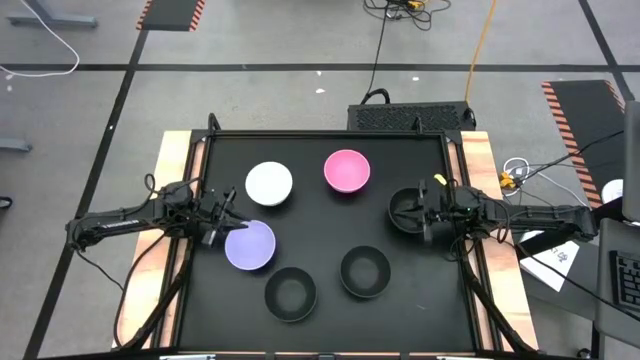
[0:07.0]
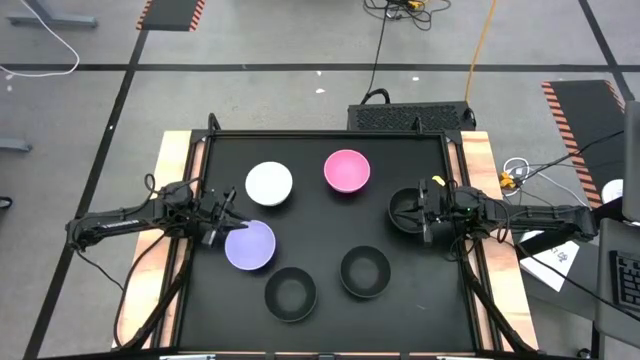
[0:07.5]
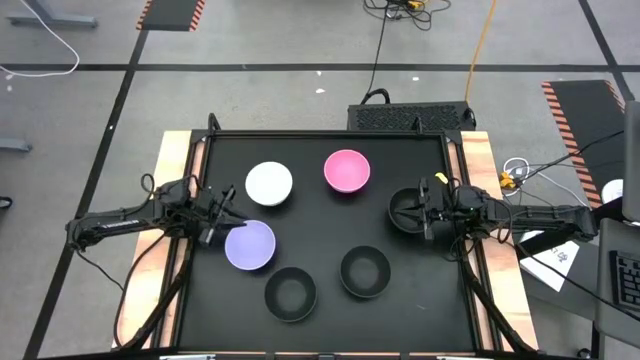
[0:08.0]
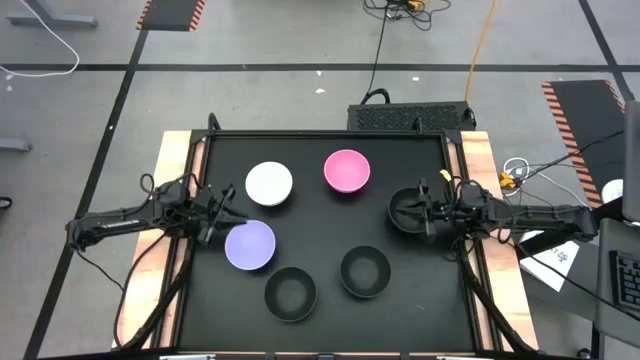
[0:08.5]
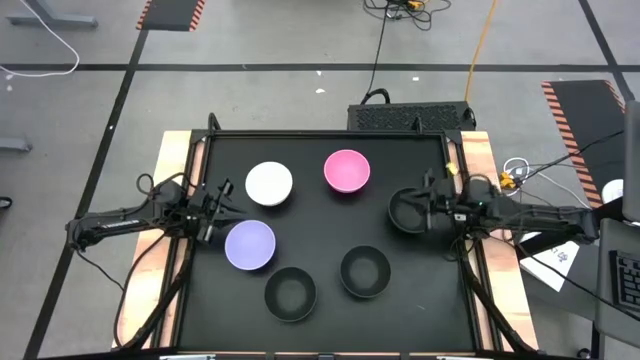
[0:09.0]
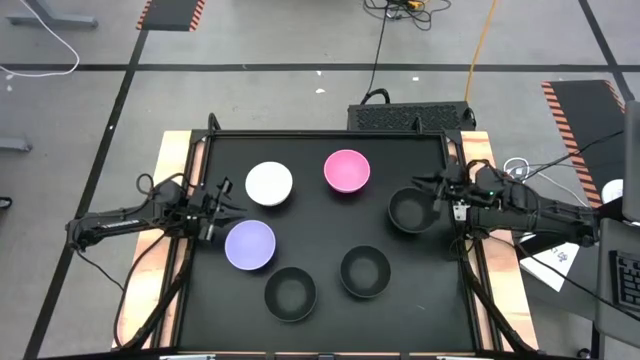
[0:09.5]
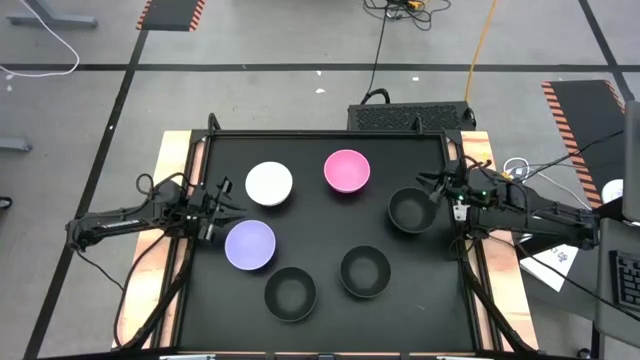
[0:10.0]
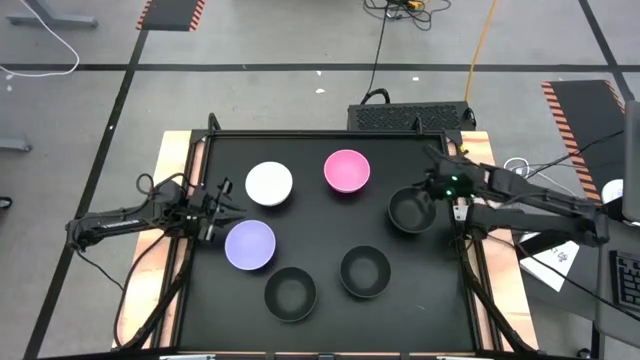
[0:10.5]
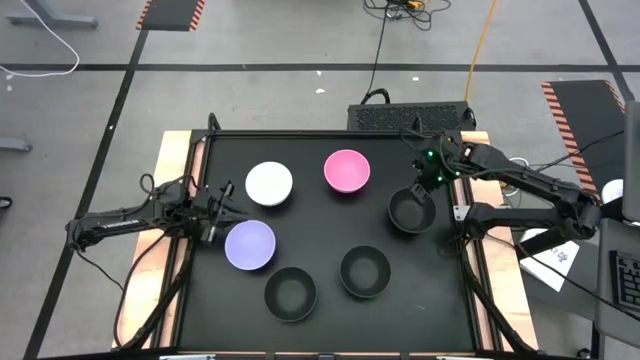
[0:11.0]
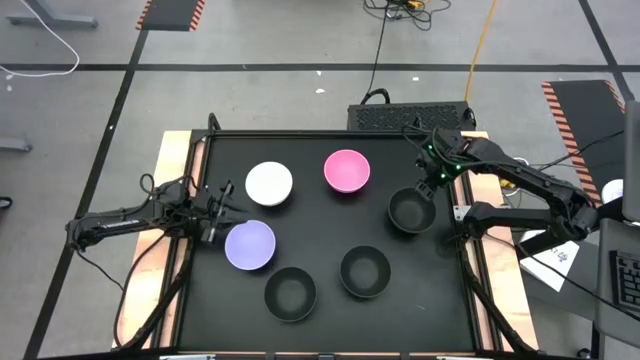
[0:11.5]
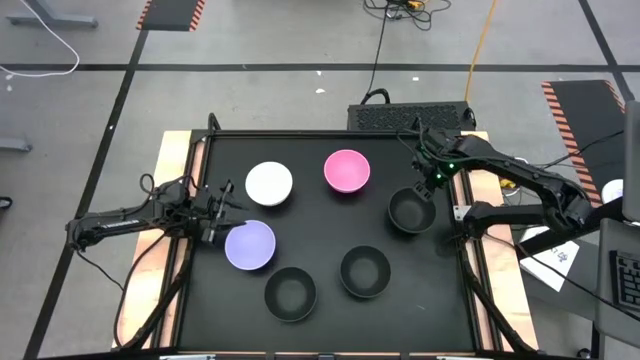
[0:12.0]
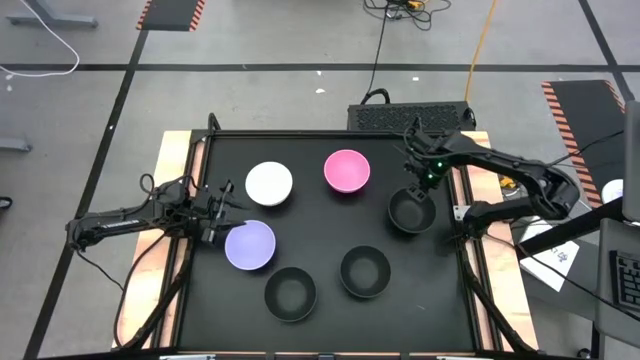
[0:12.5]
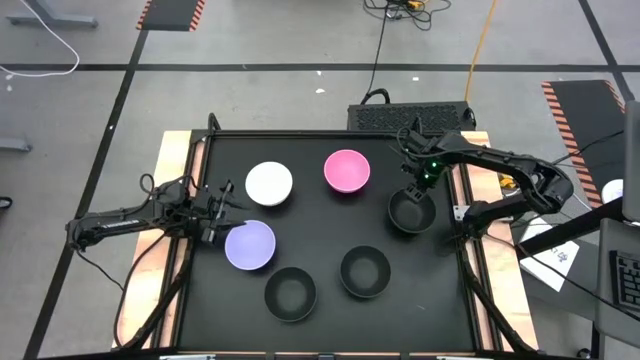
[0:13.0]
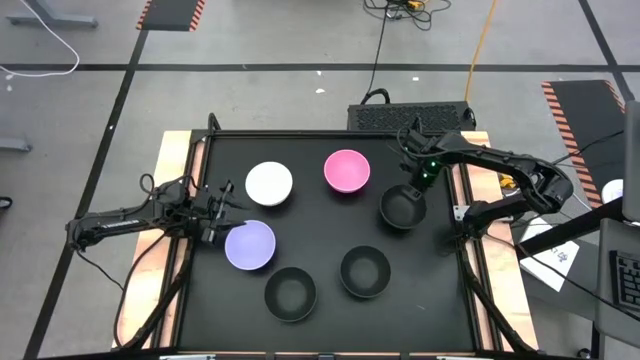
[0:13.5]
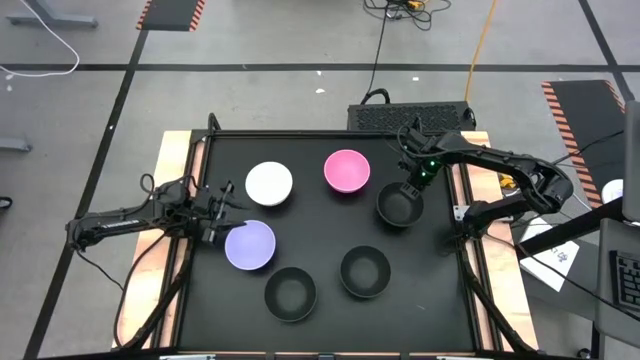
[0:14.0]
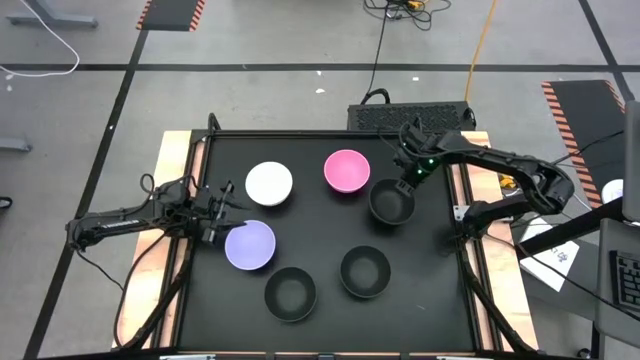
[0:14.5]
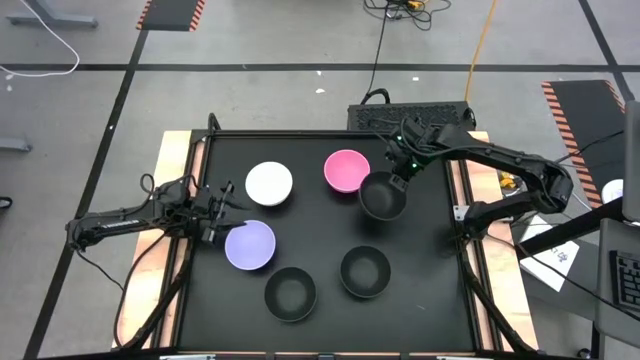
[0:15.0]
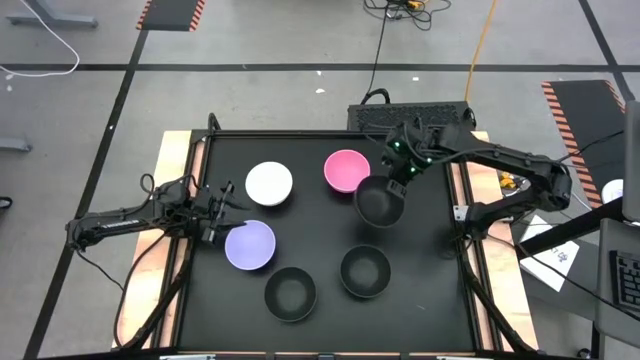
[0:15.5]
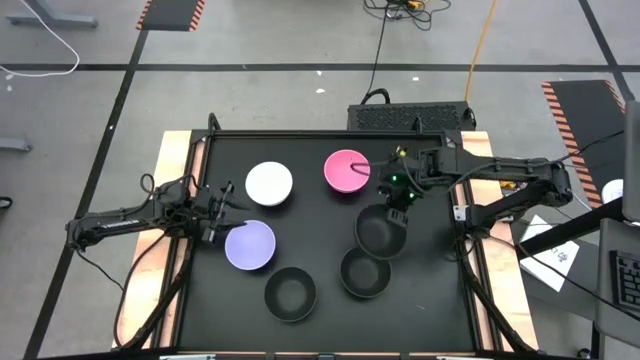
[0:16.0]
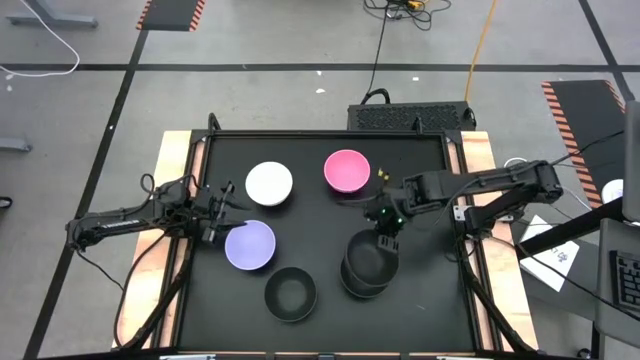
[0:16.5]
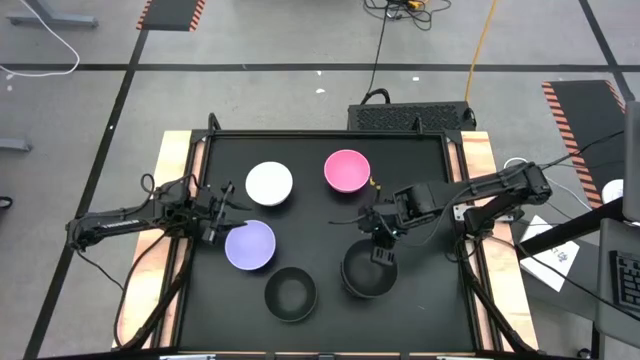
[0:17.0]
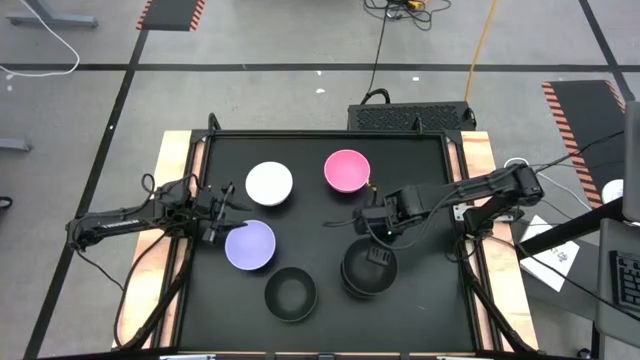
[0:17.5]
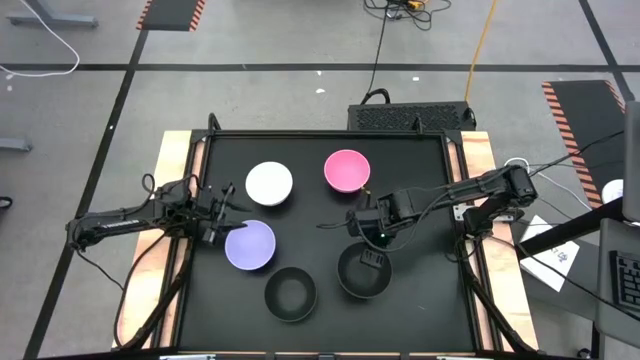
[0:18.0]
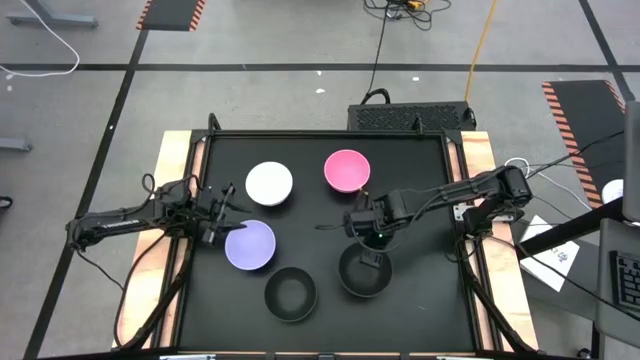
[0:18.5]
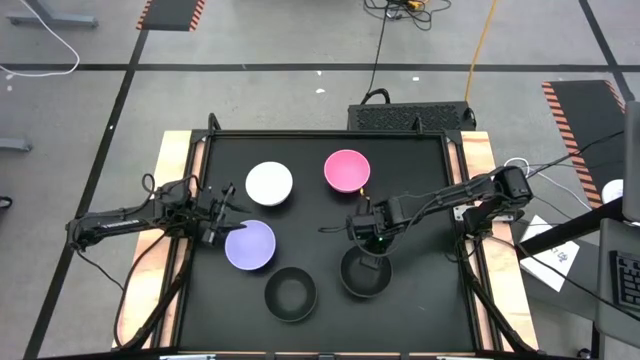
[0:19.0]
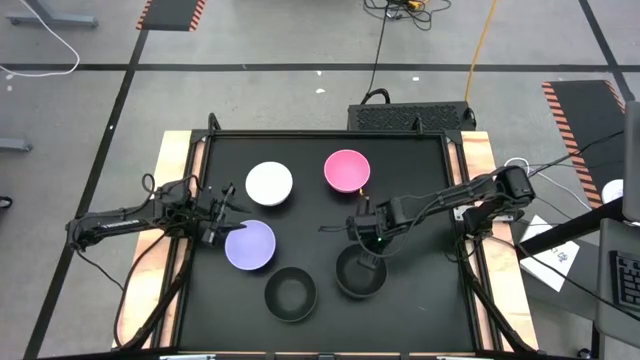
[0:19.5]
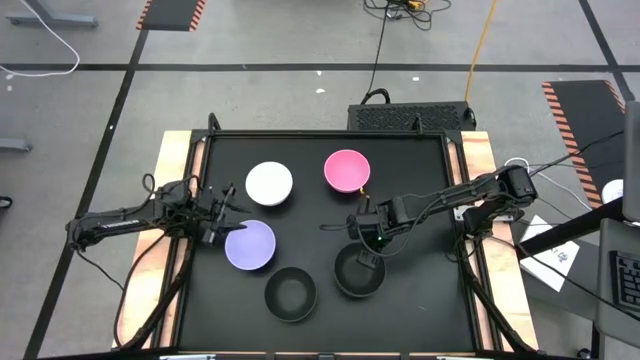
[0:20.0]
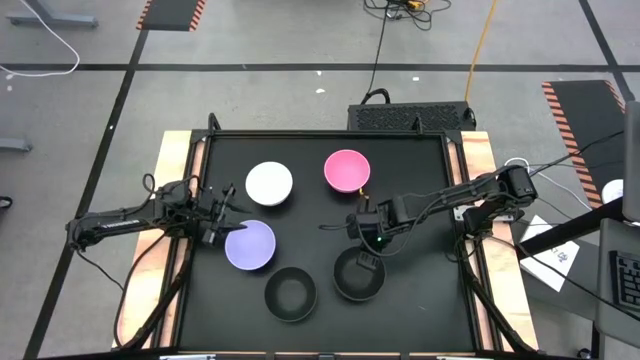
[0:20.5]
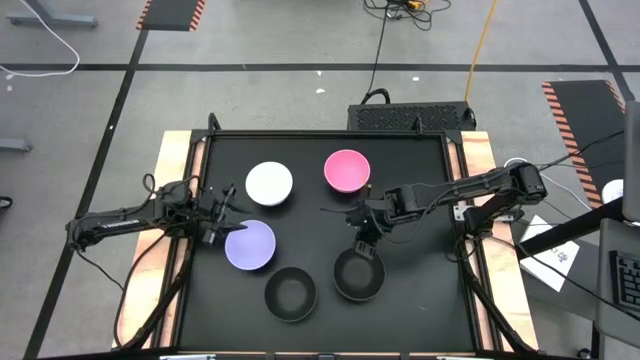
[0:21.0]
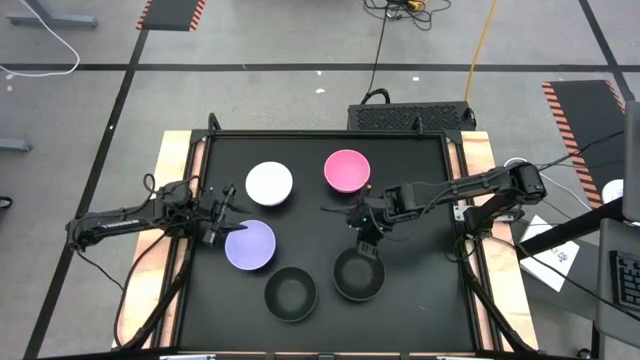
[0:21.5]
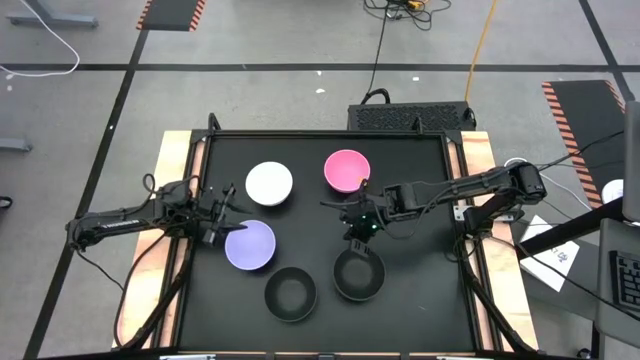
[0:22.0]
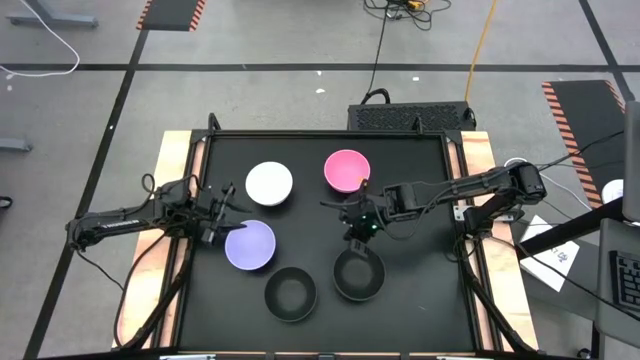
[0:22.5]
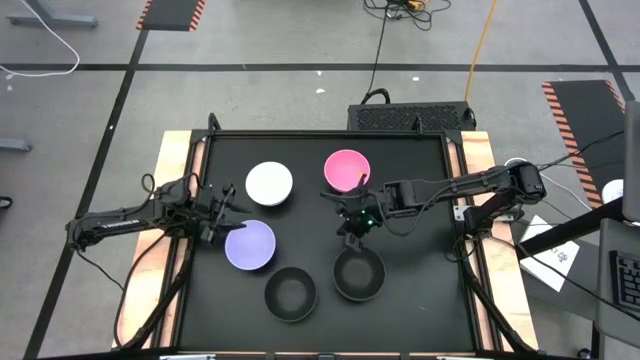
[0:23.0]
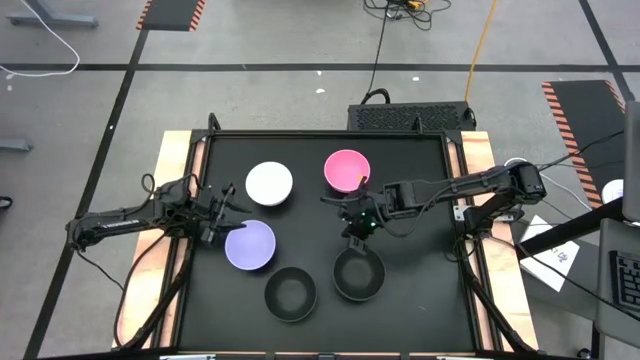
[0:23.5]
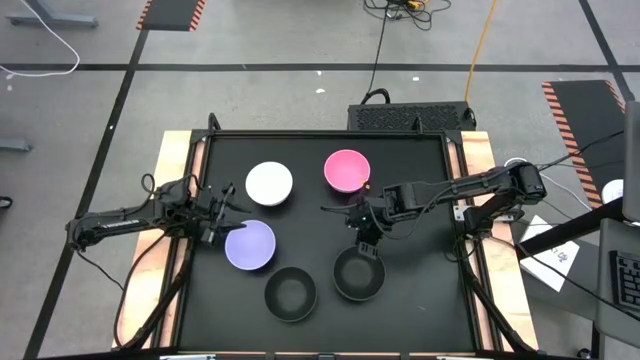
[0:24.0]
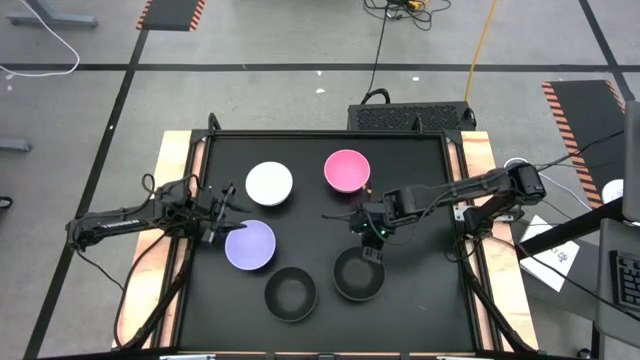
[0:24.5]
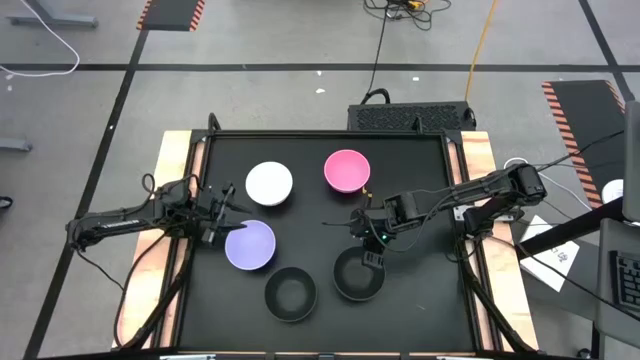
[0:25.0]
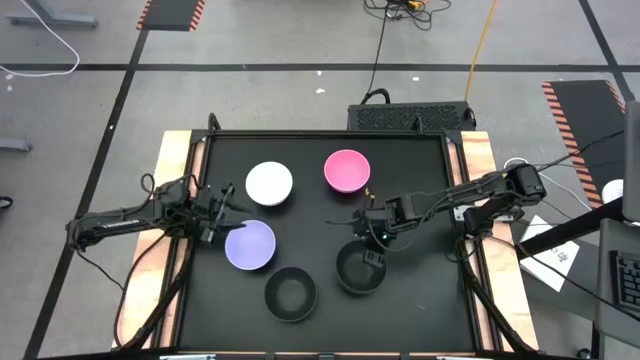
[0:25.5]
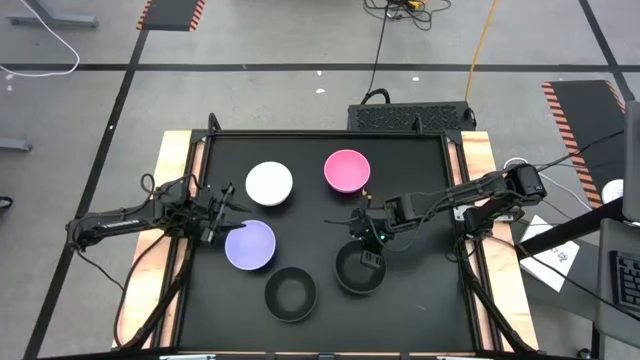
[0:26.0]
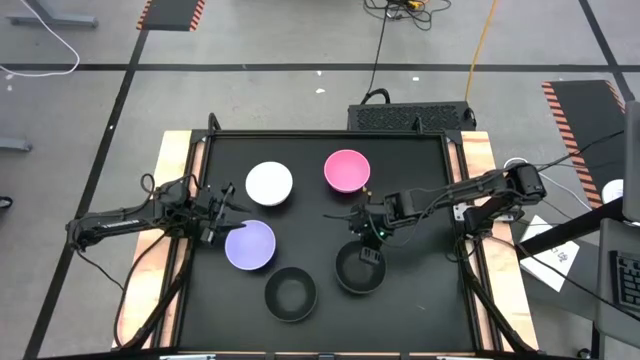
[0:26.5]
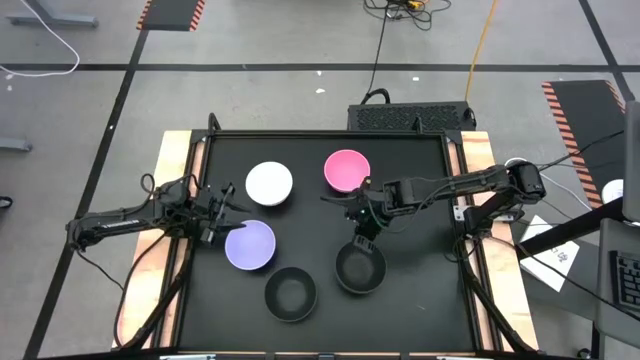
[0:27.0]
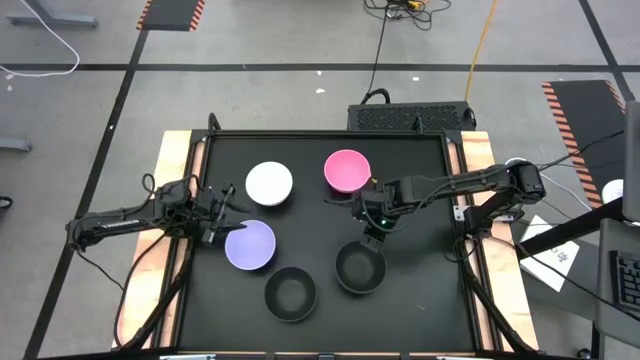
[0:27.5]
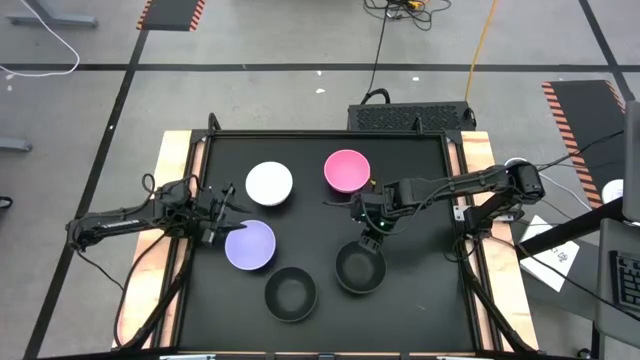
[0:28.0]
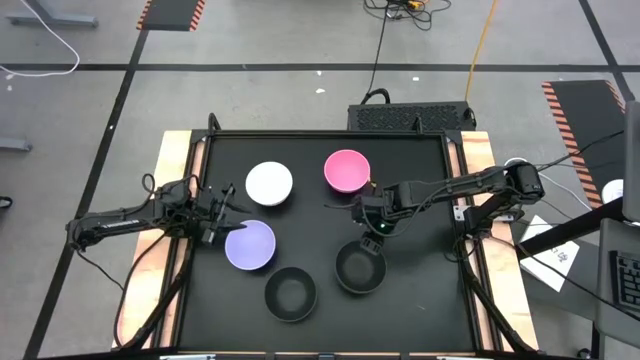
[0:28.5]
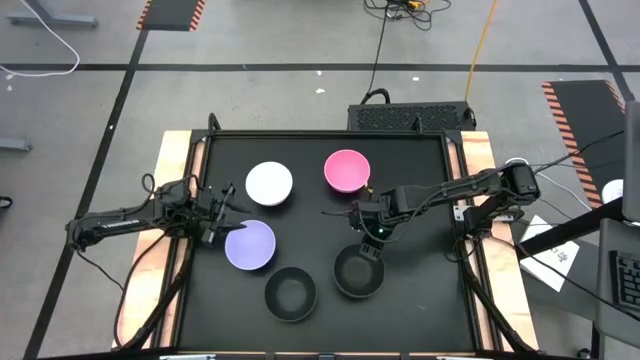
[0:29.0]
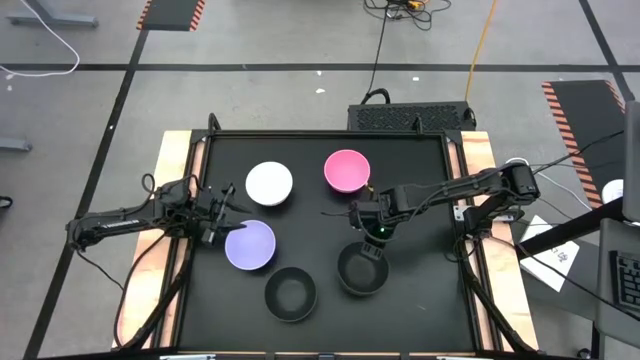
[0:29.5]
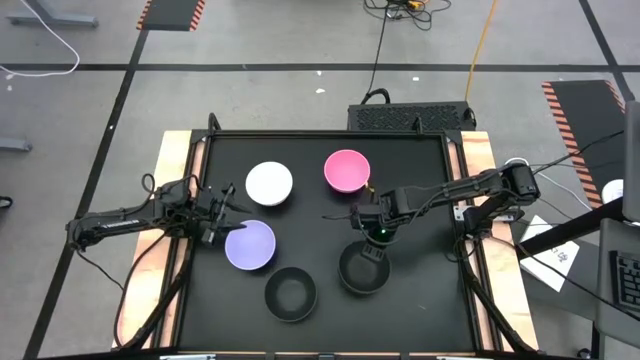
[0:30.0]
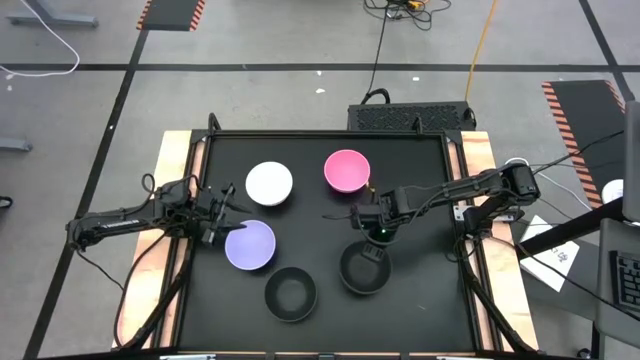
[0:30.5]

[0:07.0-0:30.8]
Task: Nest bowls inside each other
Stack the top right black bowl on top of the middle black bowl on the table
